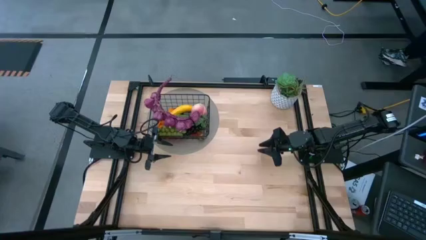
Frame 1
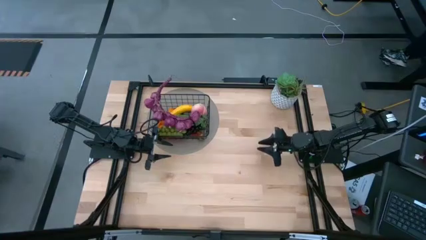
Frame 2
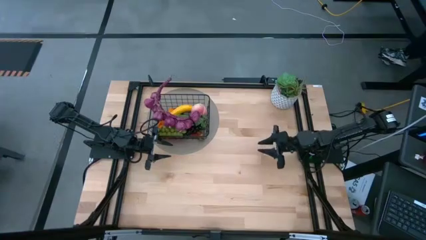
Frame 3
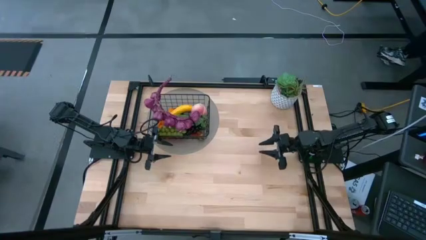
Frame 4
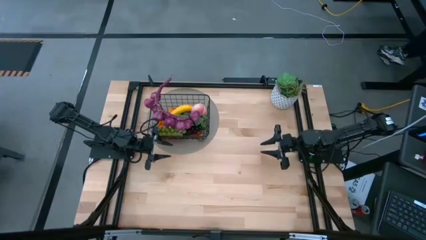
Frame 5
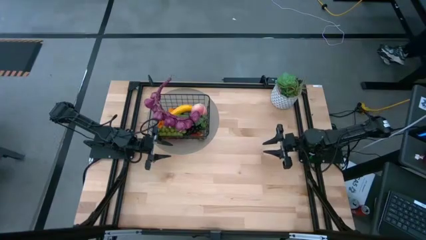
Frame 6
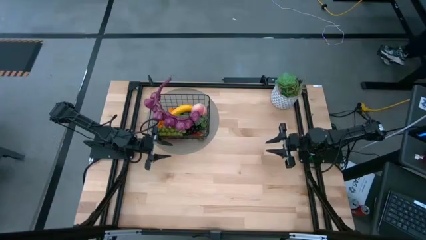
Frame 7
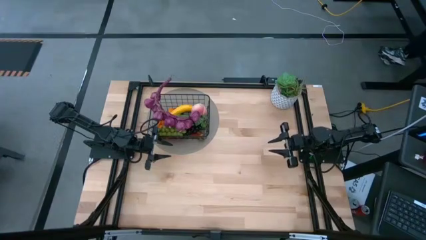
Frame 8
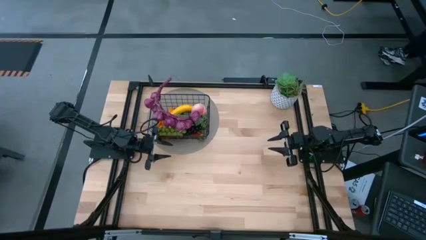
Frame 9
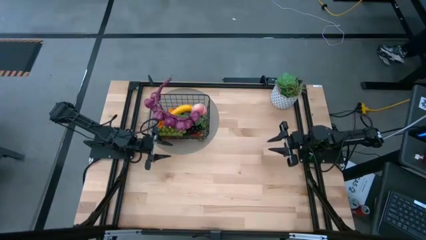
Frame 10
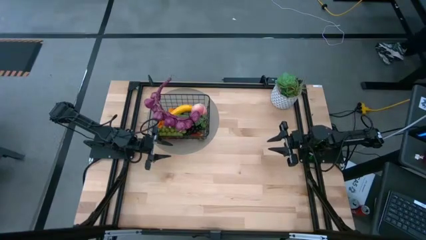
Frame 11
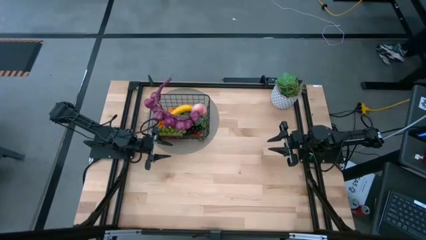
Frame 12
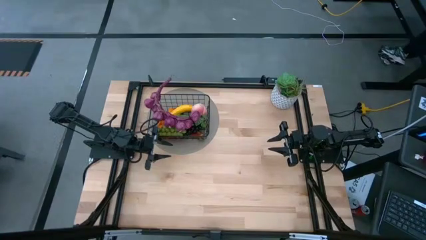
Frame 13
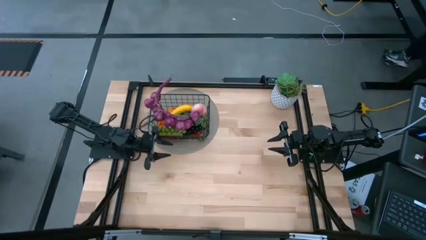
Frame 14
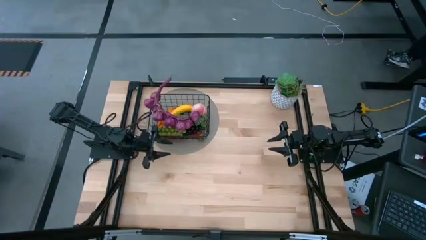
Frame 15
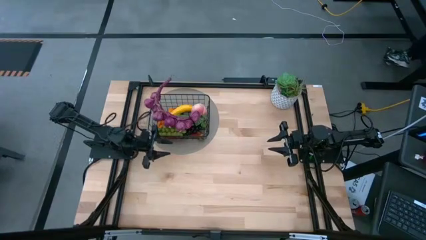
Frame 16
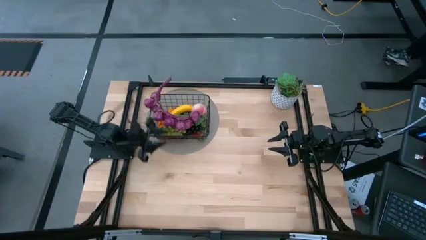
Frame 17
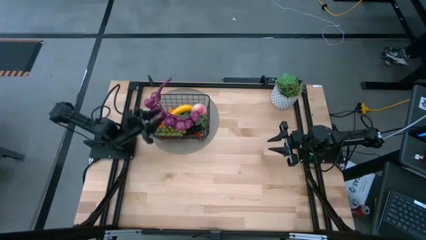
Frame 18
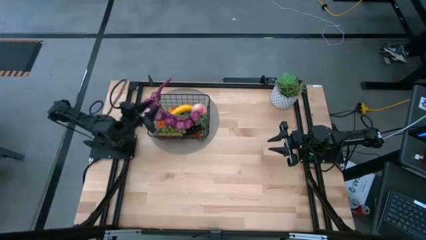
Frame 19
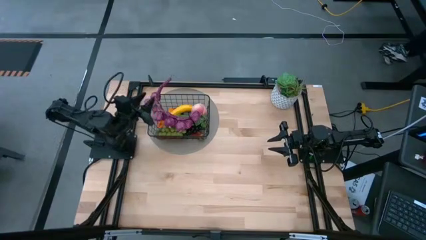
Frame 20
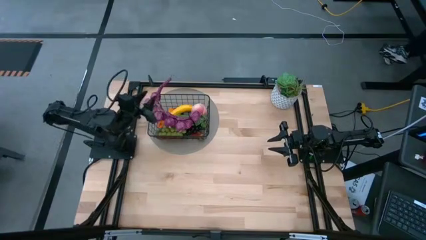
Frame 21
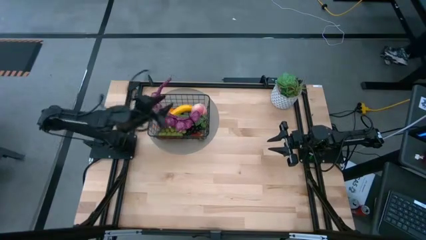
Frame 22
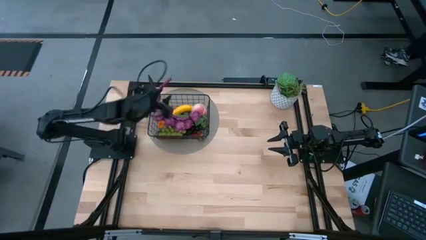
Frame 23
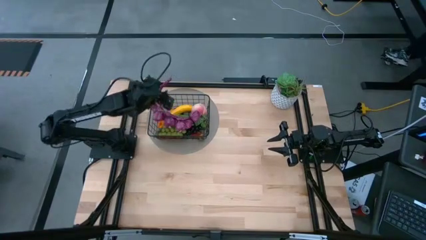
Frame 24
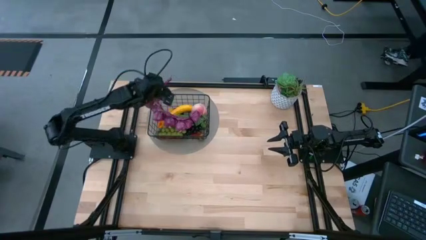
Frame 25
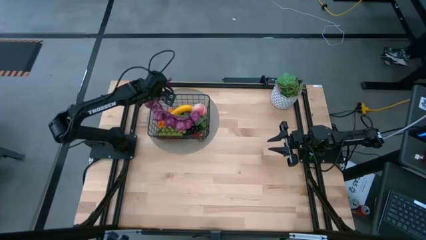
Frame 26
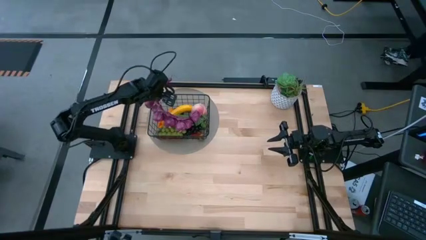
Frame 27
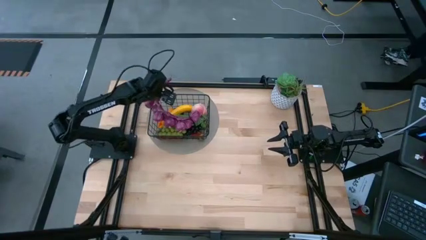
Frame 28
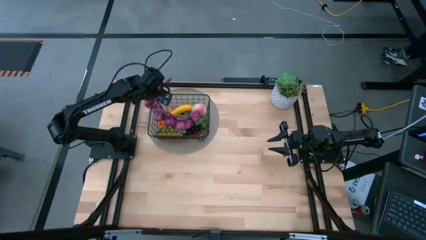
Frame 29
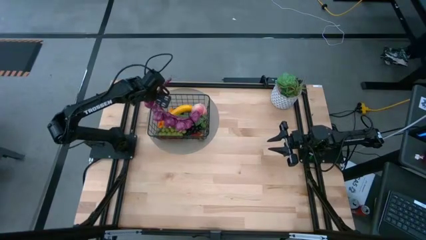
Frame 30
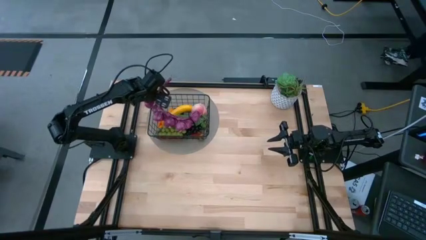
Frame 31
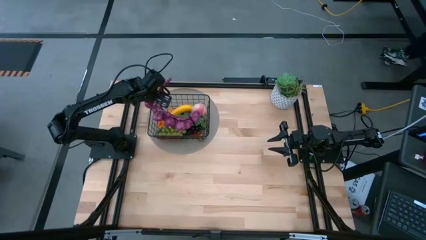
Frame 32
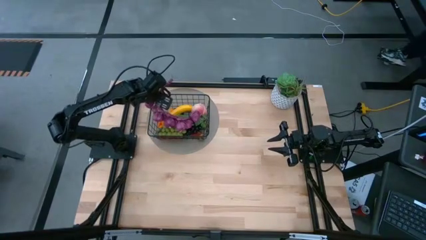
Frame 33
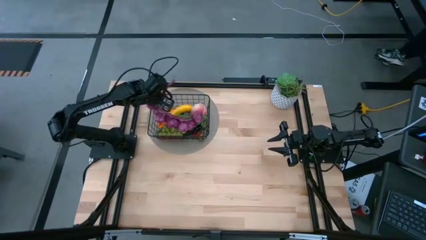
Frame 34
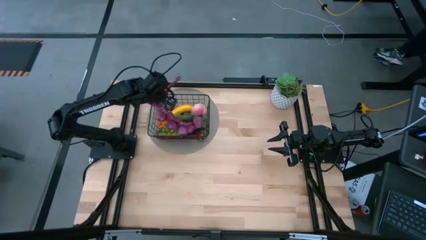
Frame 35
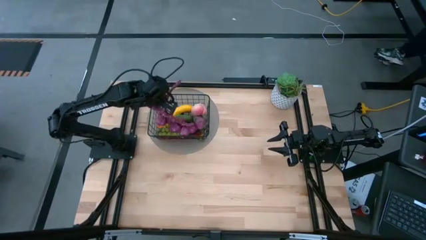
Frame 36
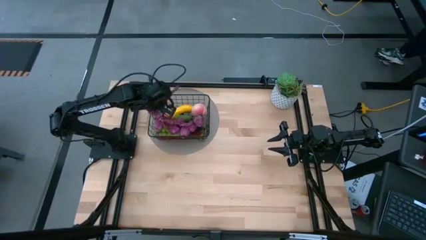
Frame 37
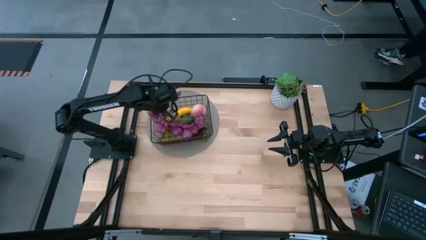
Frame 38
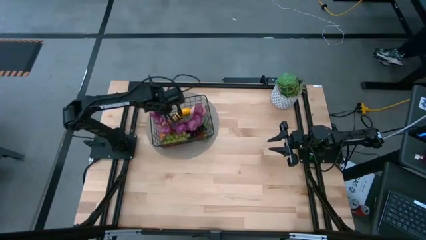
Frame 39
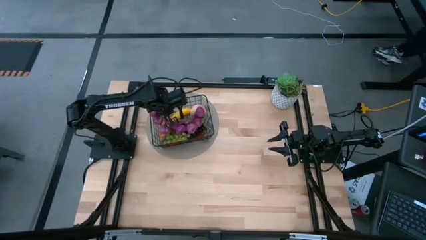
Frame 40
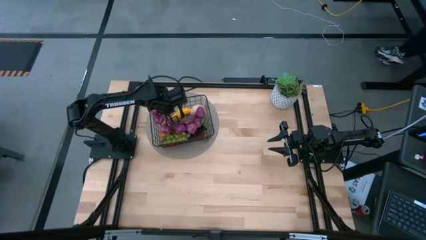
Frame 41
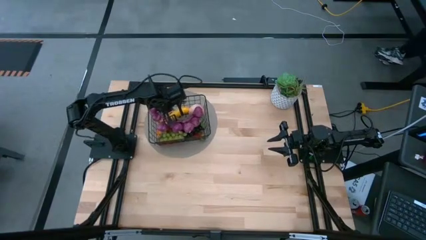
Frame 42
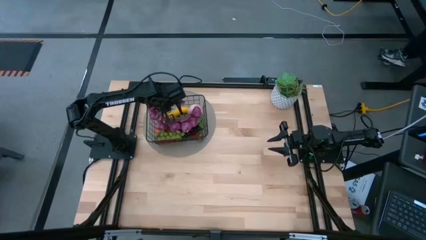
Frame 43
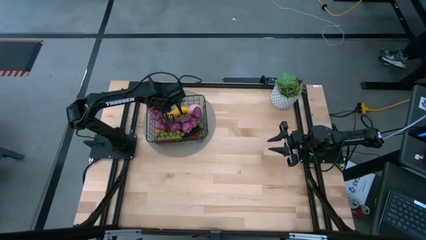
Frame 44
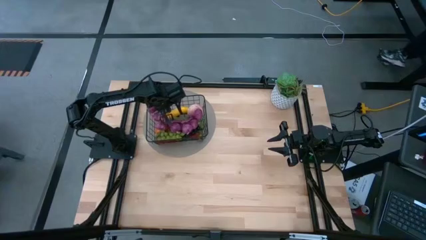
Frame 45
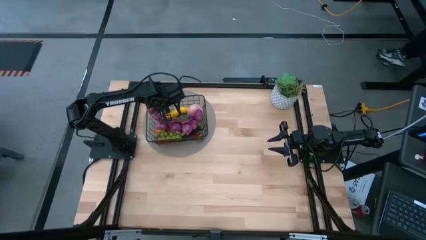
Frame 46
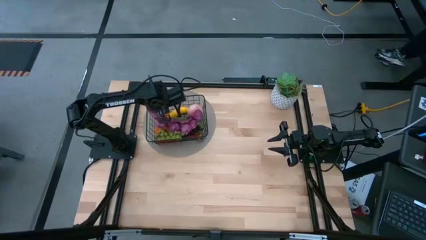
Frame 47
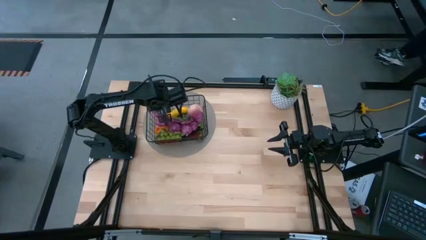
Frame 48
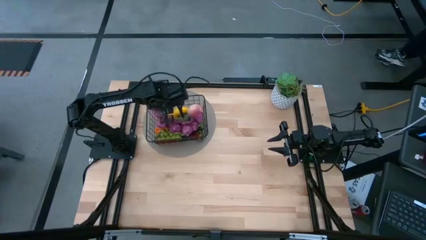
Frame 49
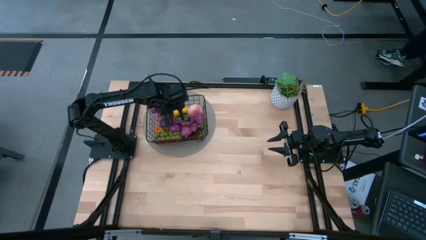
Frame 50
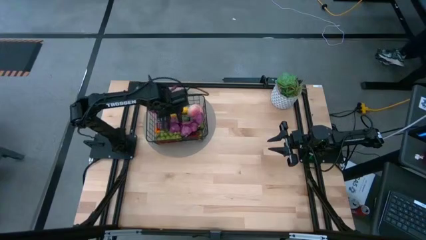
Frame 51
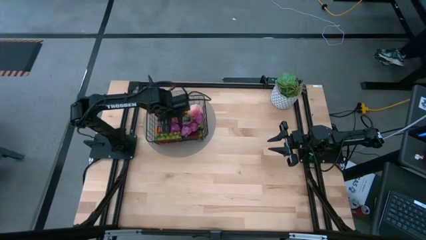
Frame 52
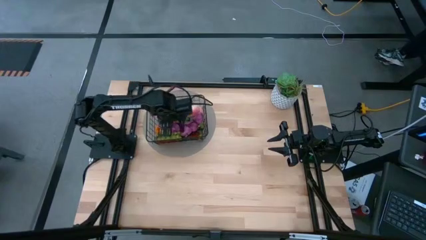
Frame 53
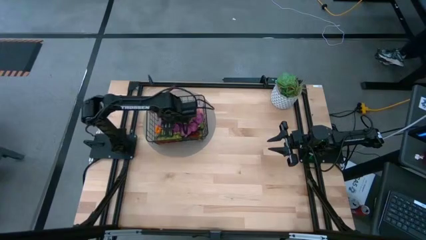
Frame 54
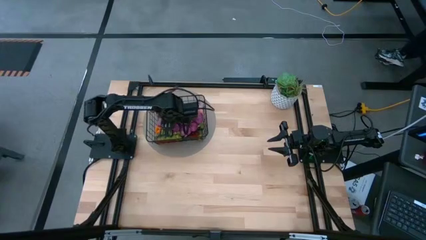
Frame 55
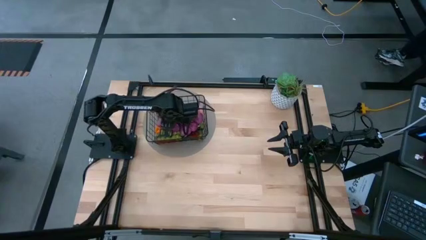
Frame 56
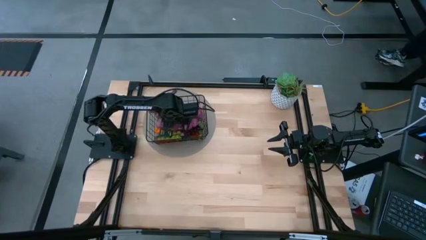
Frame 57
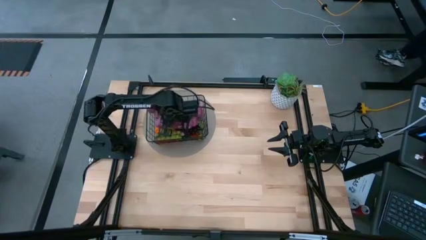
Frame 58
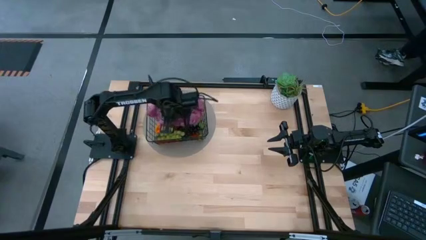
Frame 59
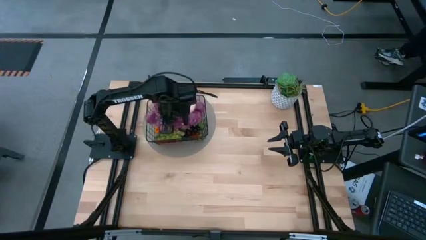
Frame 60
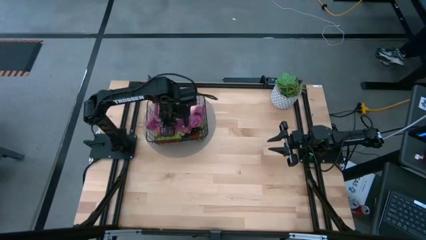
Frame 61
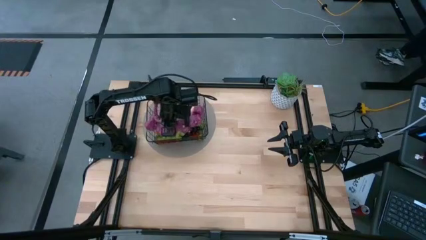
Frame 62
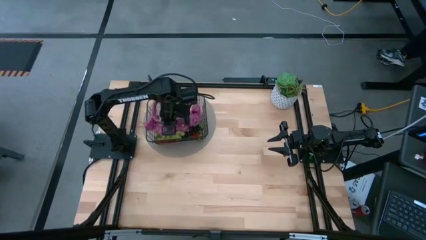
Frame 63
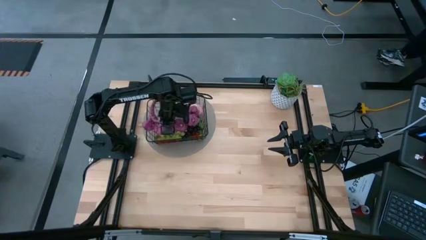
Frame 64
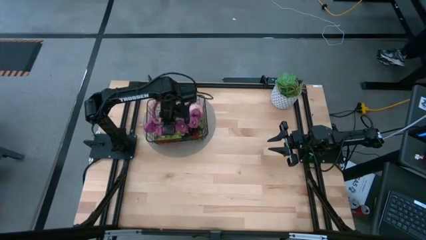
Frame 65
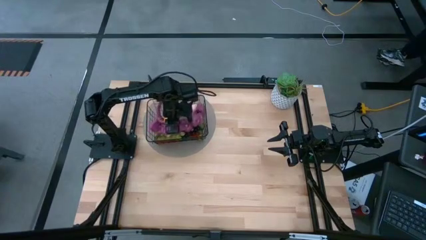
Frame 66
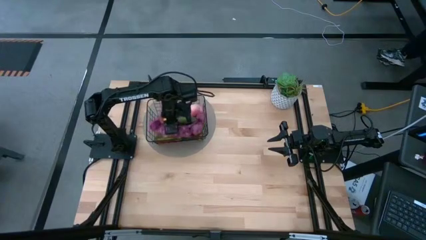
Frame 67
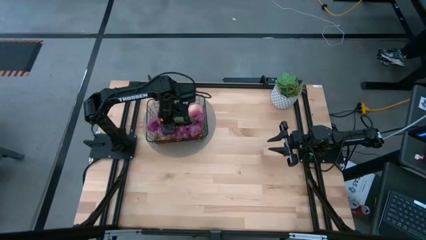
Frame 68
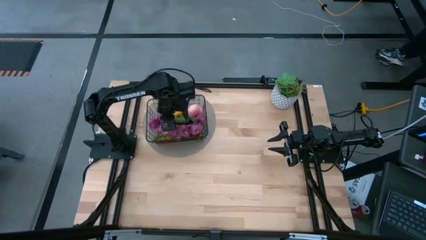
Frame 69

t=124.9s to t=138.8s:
Task: Build produce basket
Put the purple garlic into the wire basket

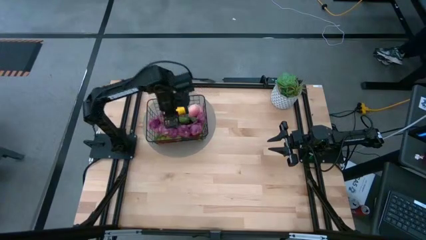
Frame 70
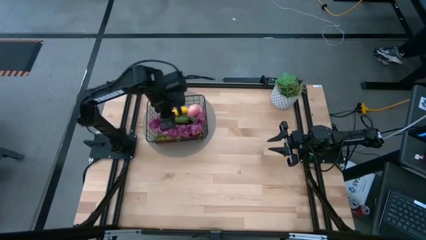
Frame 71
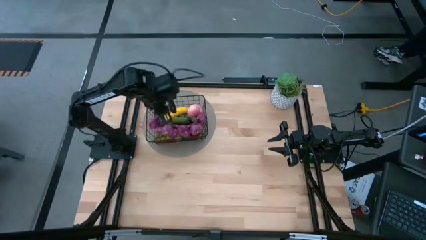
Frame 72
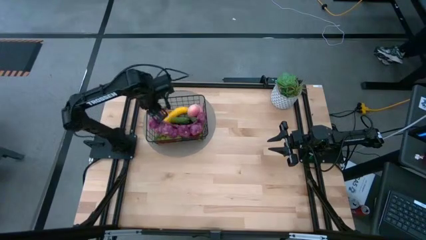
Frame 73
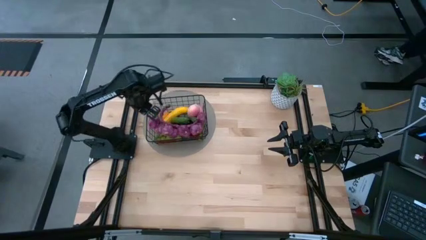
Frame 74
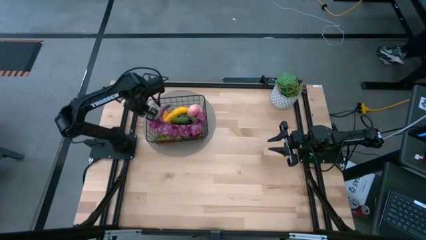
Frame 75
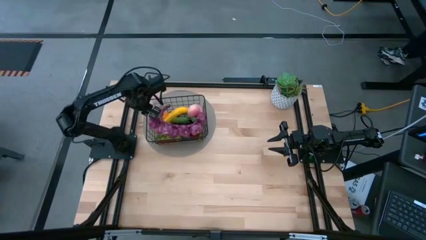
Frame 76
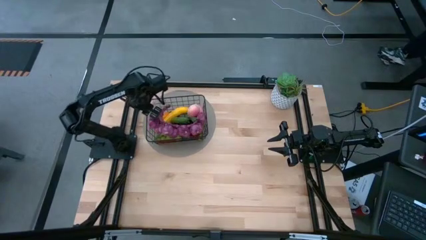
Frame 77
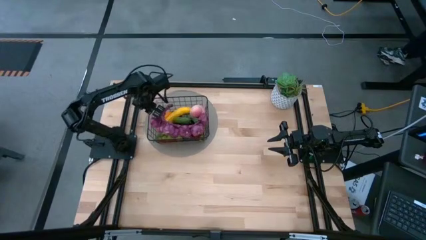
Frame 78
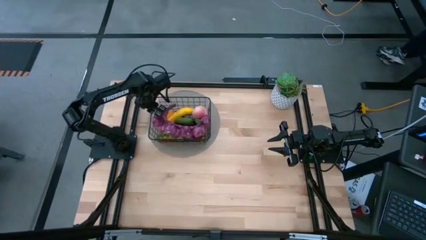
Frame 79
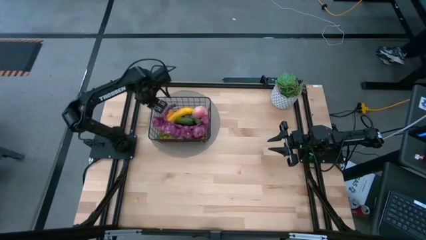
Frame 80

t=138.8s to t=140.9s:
Adjust the red wire basket

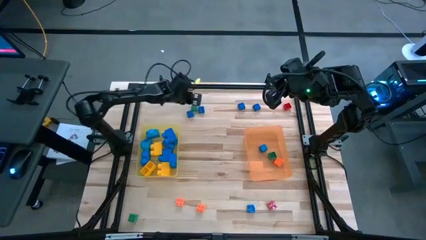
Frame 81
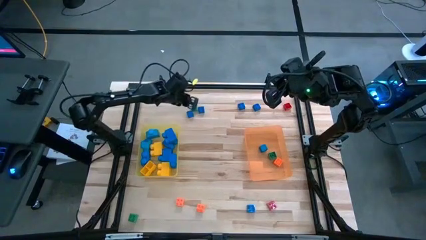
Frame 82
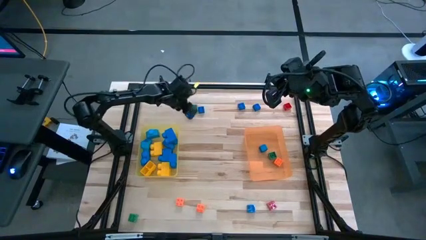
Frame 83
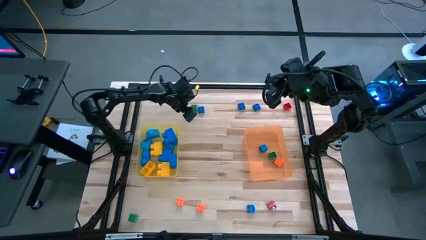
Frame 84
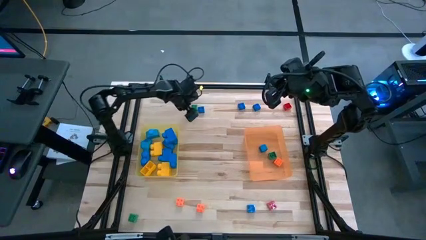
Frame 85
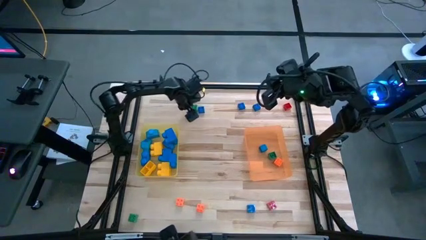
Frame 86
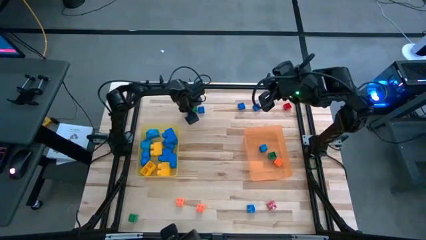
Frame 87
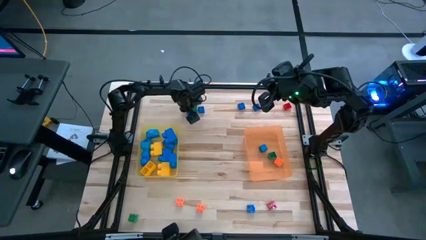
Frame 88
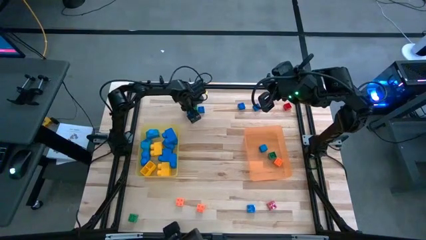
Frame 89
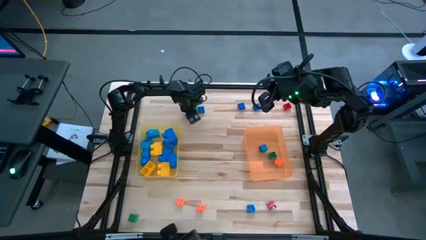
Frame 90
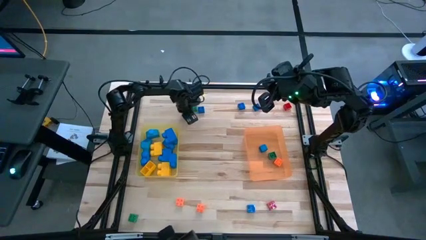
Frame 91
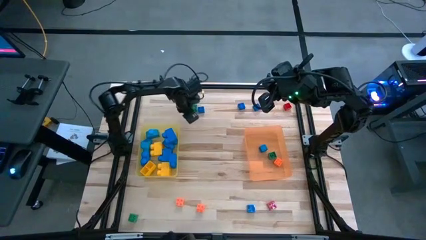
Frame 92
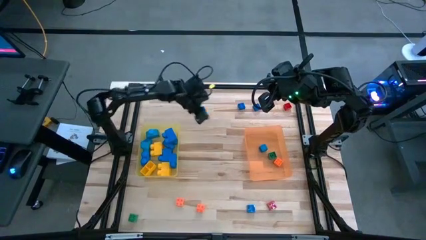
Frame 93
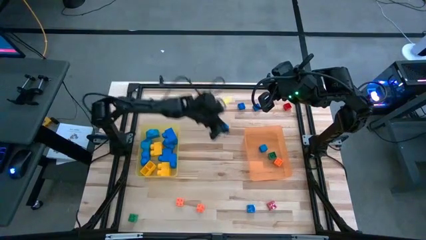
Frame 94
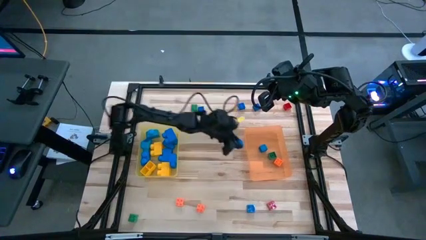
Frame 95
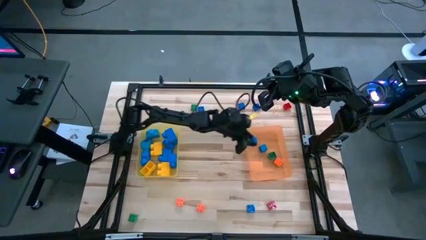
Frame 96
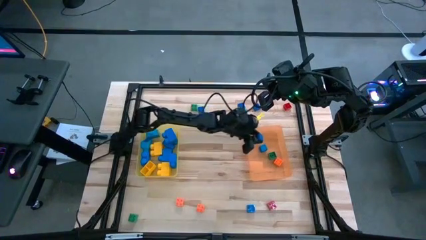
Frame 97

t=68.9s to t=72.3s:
Task: Sort blocks by size
Put the small blue game piece into the orange bin
